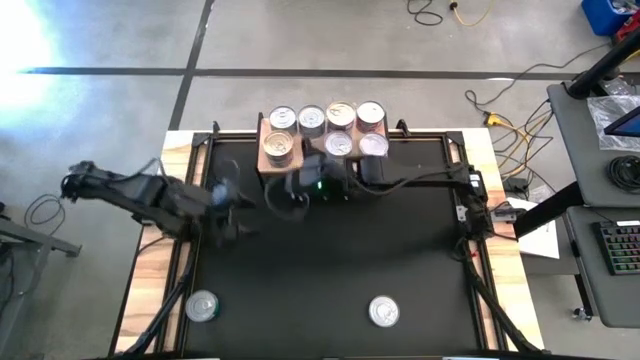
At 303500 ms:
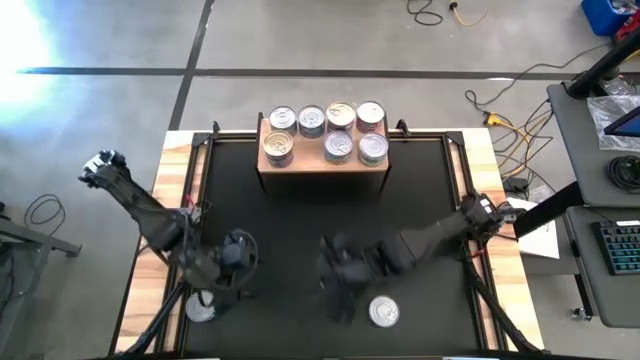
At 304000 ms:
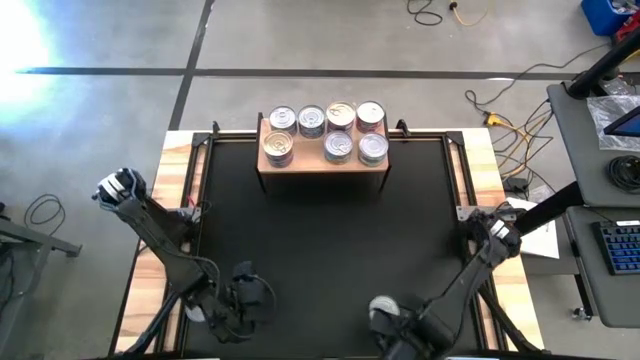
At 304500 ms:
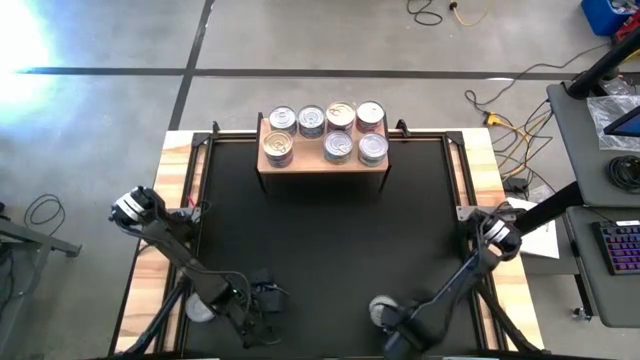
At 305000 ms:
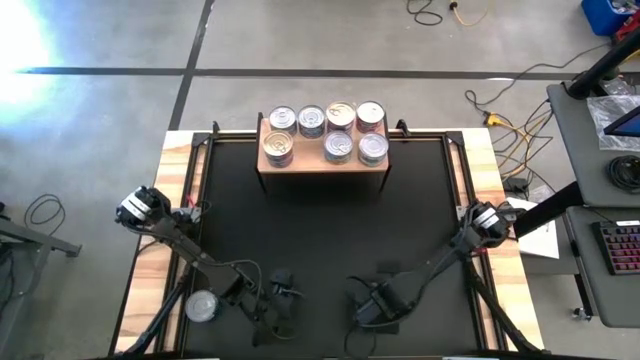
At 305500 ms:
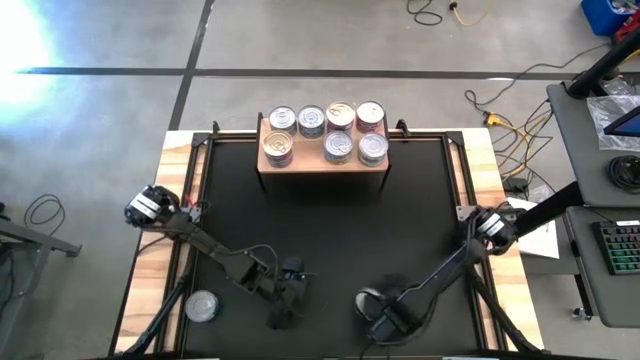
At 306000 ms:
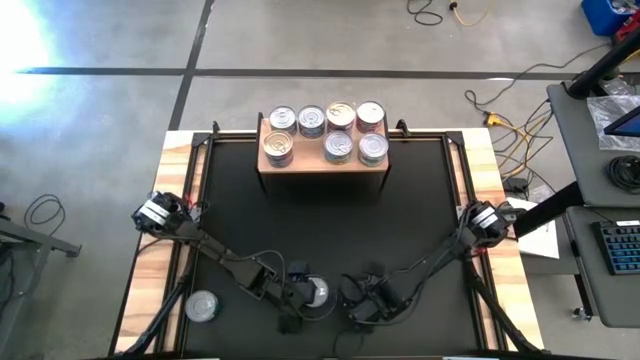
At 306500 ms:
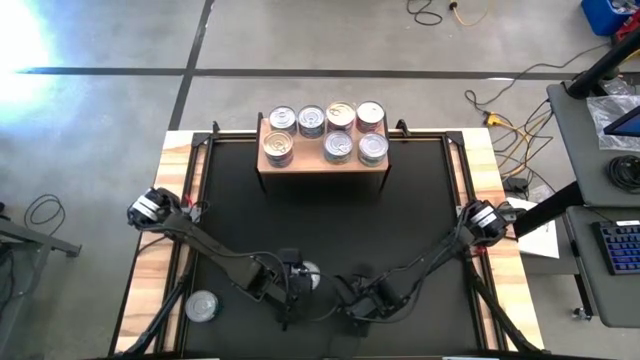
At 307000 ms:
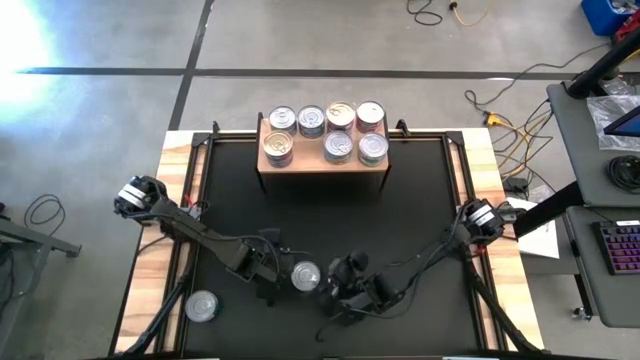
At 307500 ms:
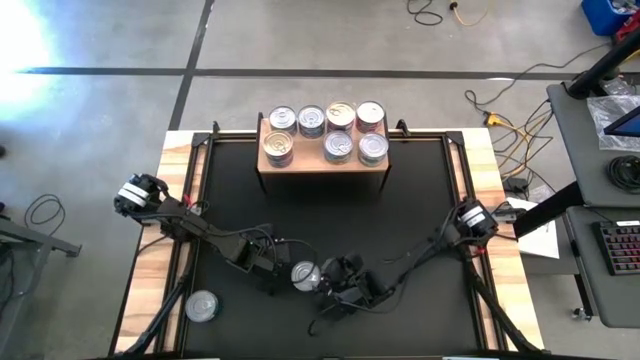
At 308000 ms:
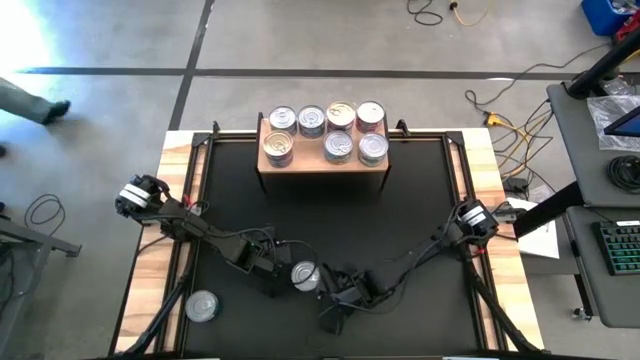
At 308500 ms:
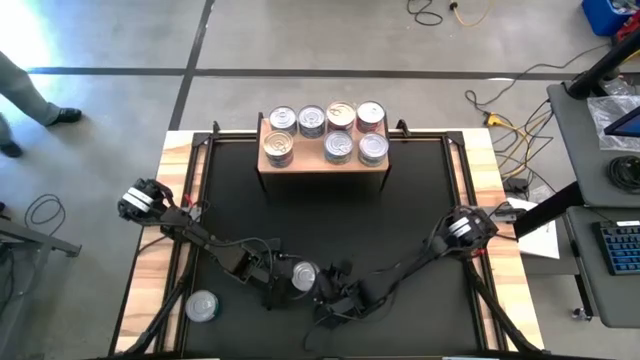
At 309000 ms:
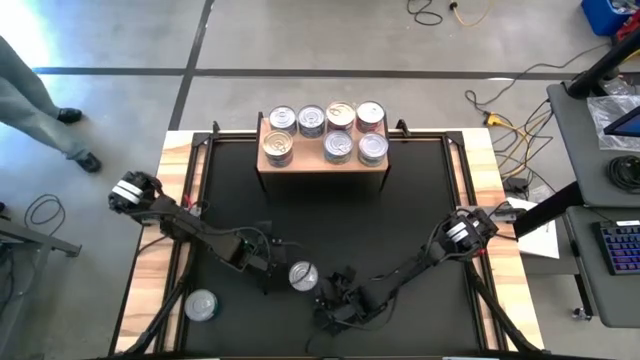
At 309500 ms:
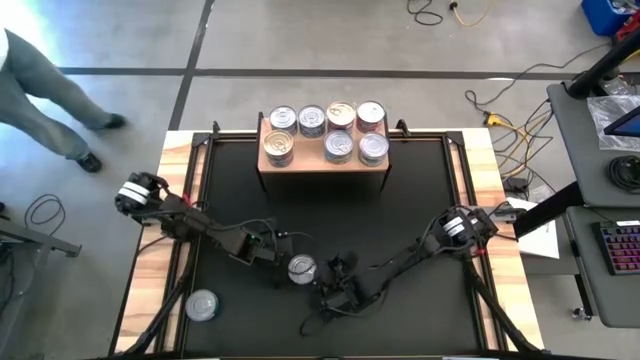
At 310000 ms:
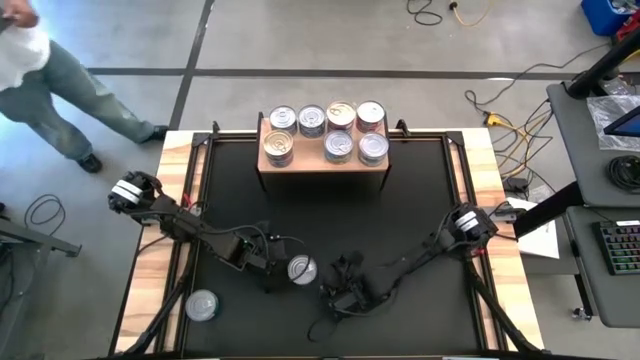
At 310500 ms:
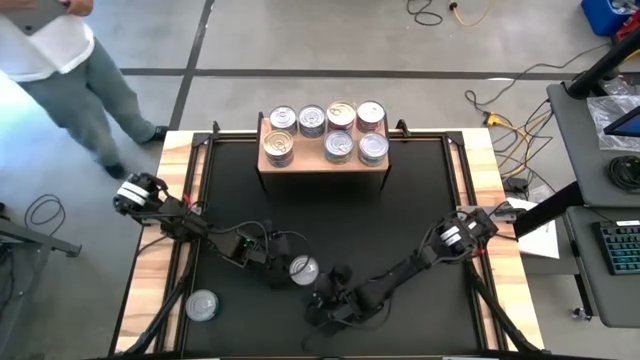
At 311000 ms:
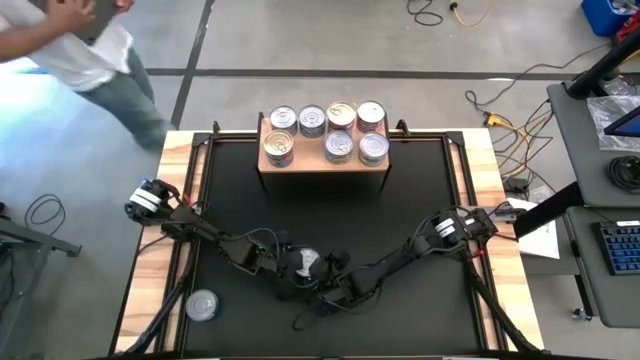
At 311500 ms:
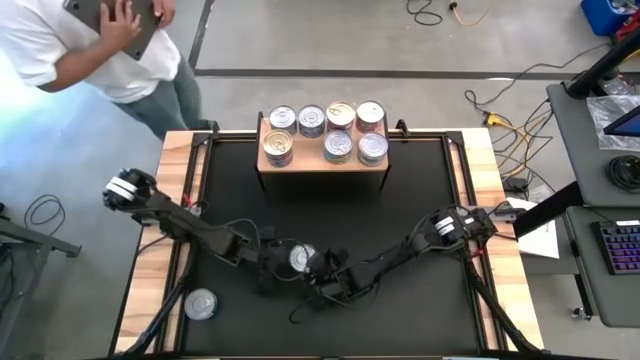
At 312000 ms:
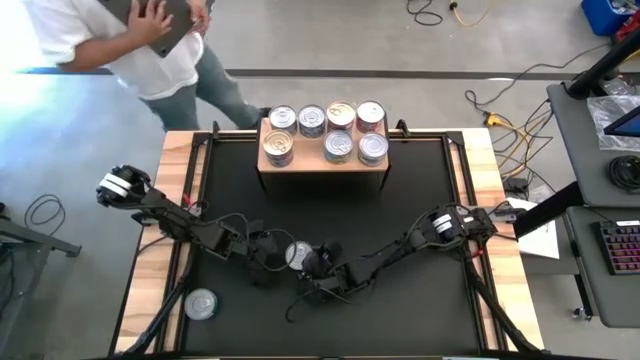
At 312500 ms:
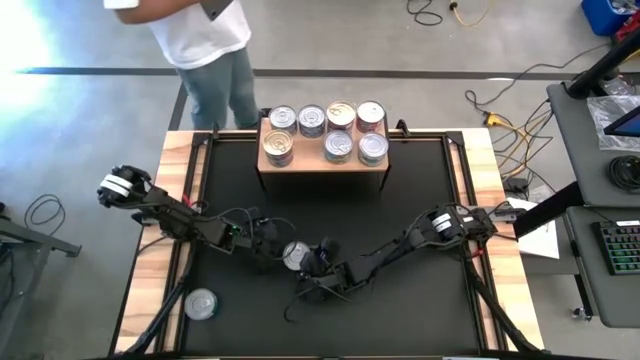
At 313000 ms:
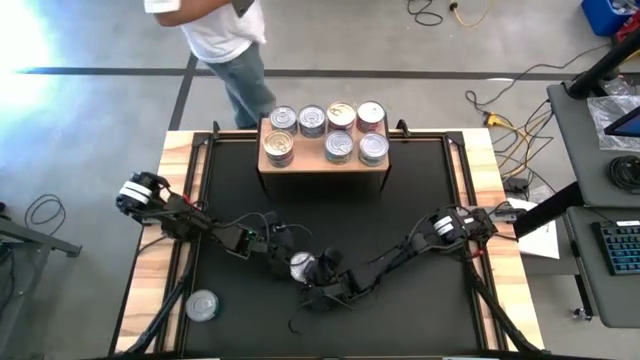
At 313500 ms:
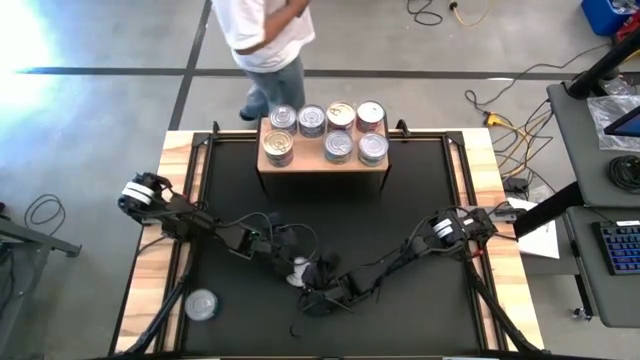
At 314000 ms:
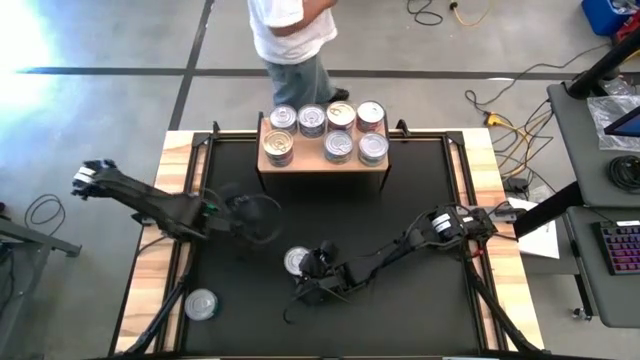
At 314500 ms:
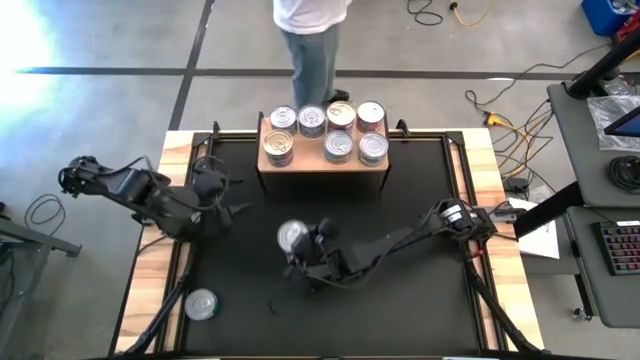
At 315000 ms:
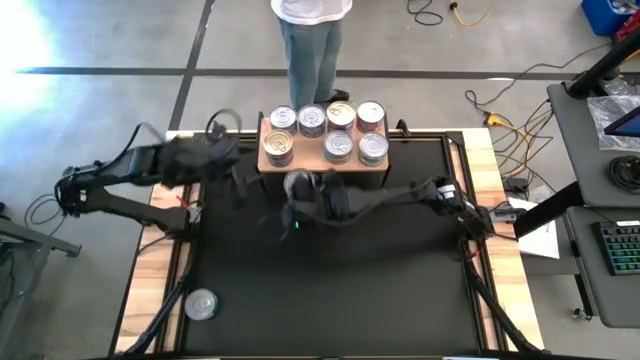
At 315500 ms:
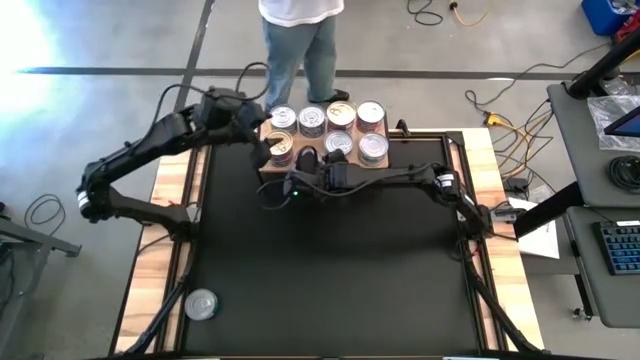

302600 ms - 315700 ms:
Task: Stack canned seafood by type on shelf
Put the green-blue tuna can on the shelf

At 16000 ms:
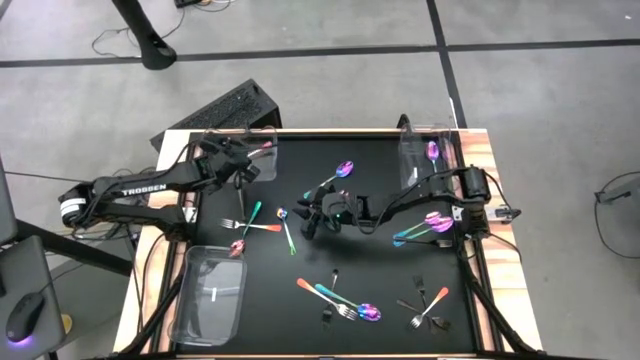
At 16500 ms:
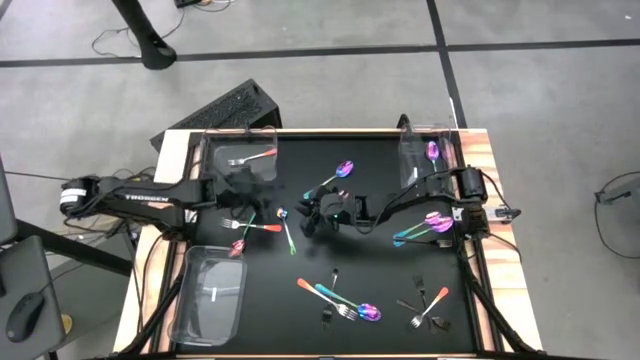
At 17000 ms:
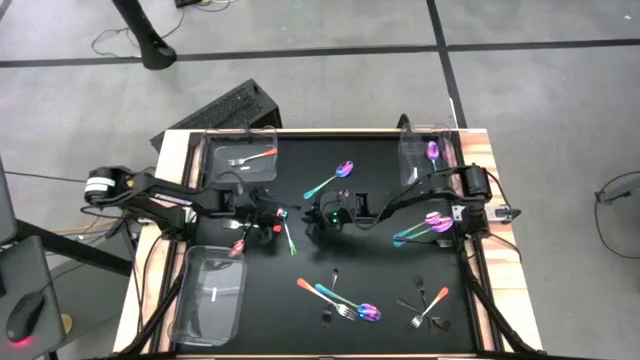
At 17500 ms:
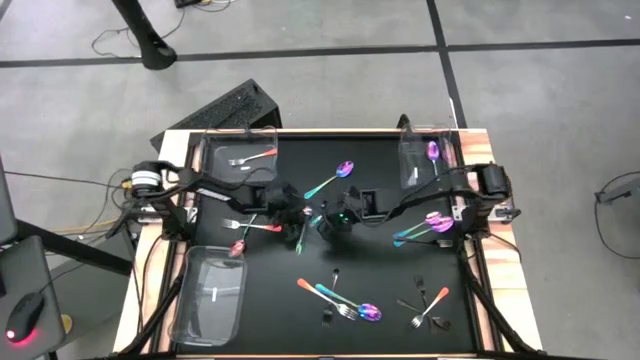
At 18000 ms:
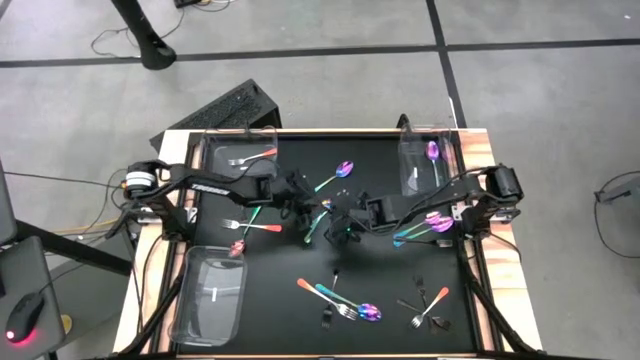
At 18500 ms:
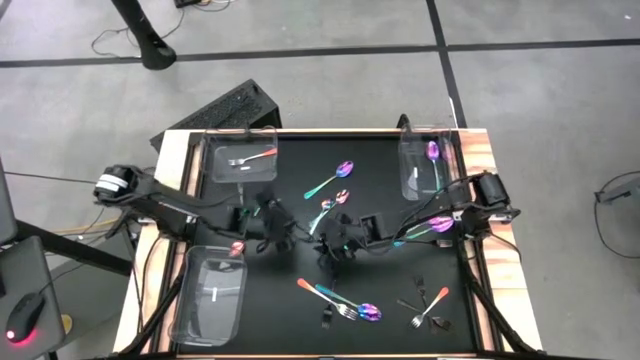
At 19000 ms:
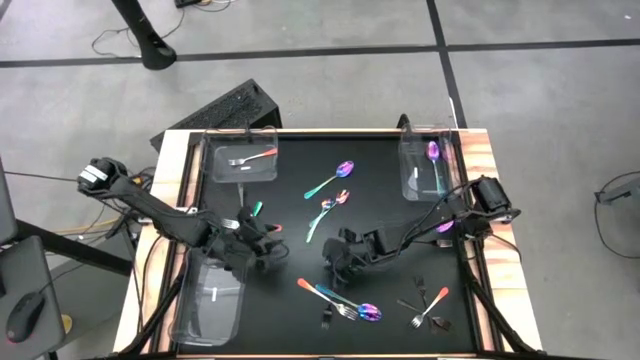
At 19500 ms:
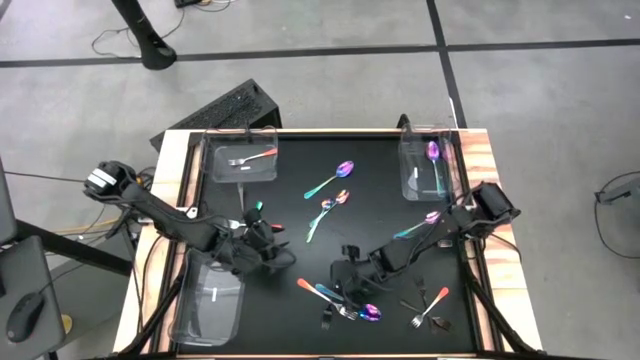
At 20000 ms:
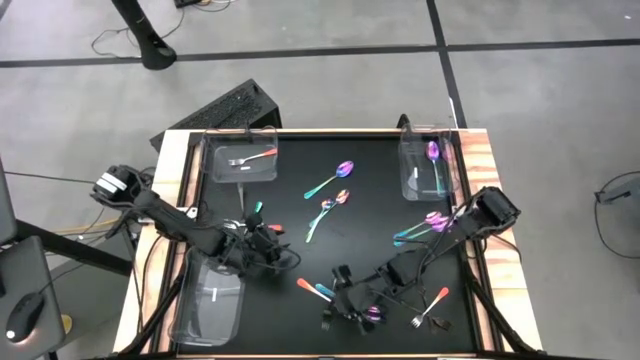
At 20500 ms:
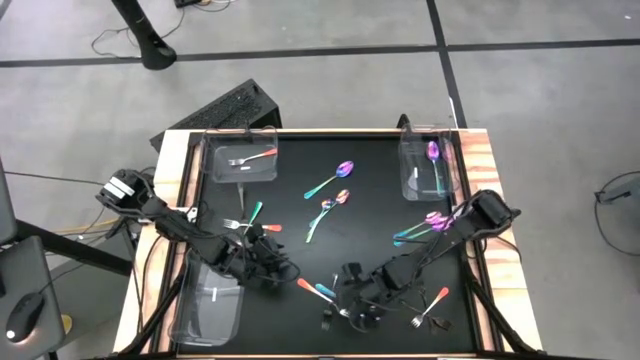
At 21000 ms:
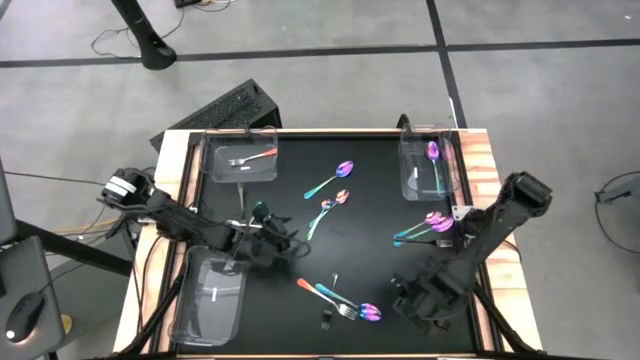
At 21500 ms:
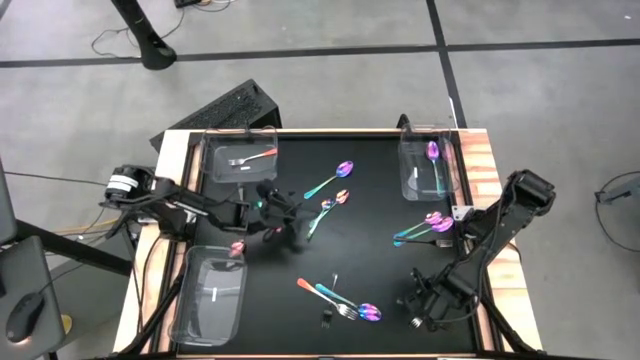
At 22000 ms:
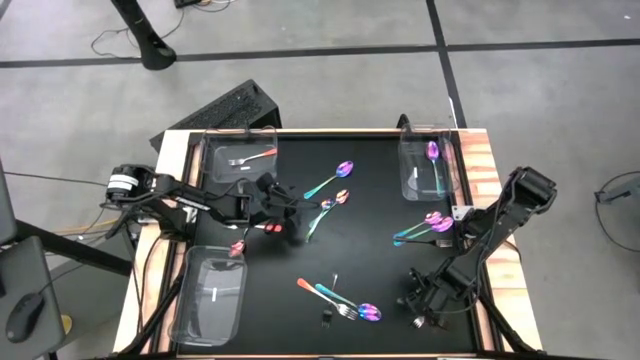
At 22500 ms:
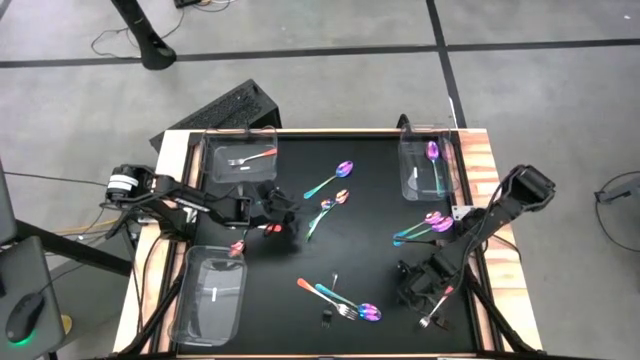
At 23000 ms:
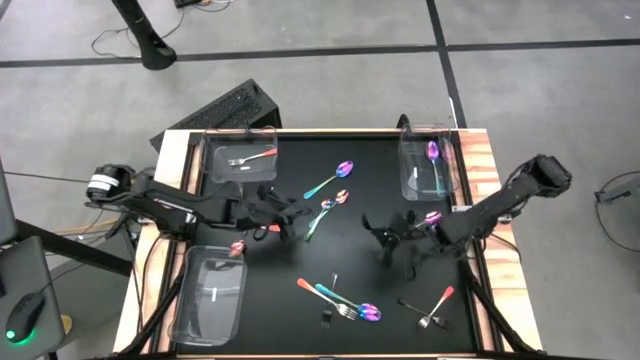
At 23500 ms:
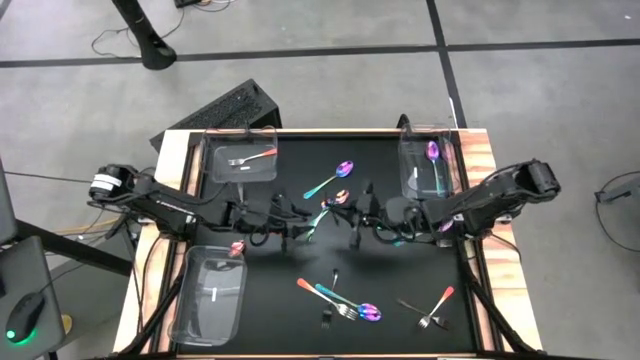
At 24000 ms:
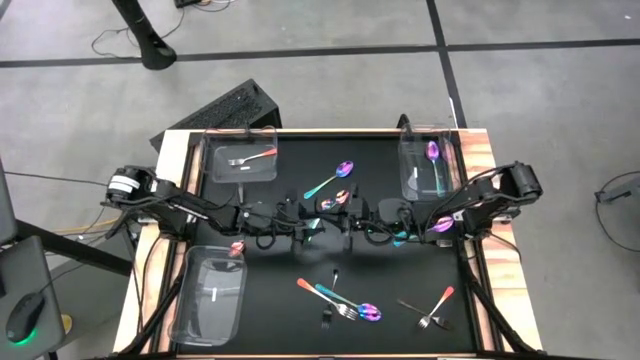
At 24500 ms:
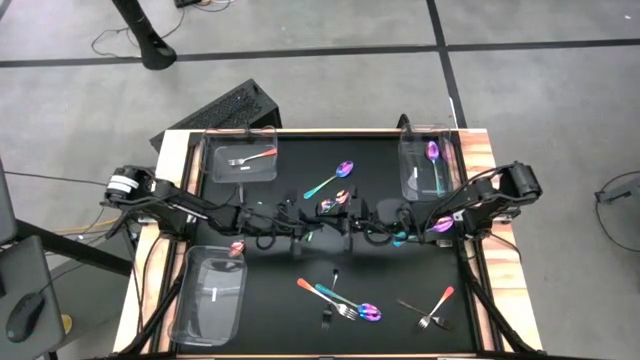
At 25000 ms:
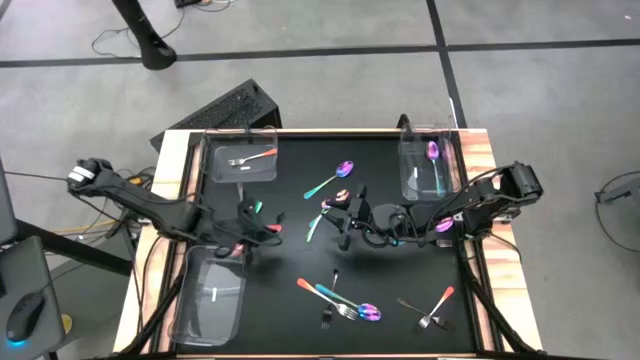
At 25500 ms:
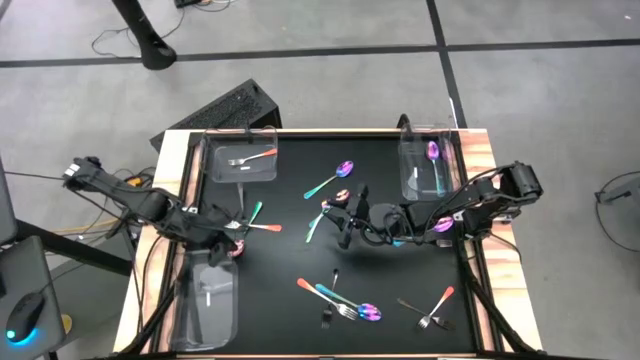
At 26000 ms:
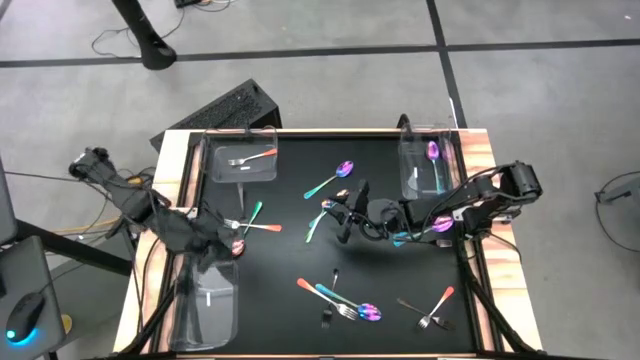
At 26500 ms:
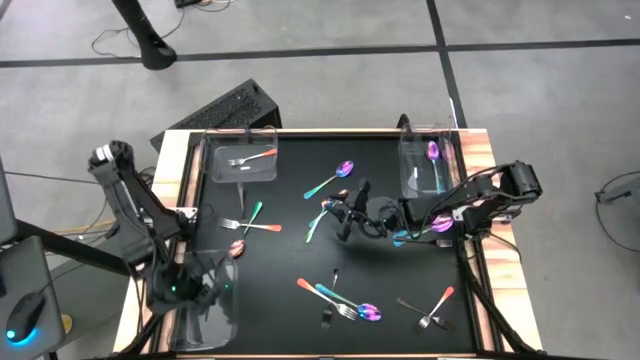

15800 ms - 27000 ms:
Task: Sort silverware by color (type)
Put the black fork into the bottom transparent bin
